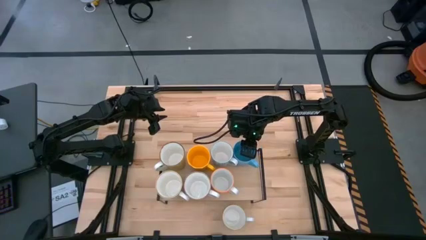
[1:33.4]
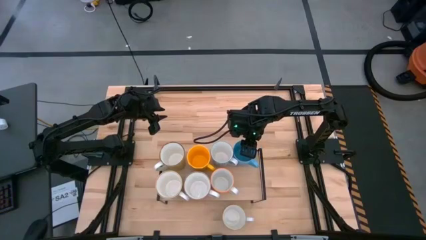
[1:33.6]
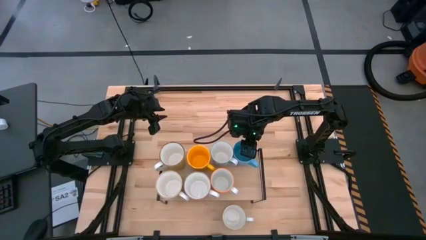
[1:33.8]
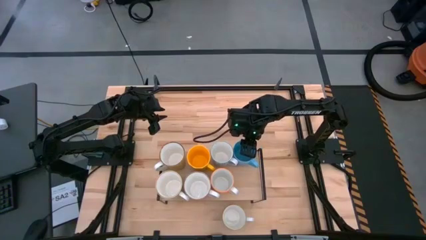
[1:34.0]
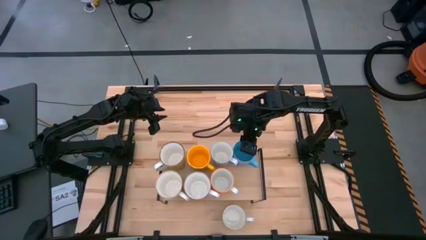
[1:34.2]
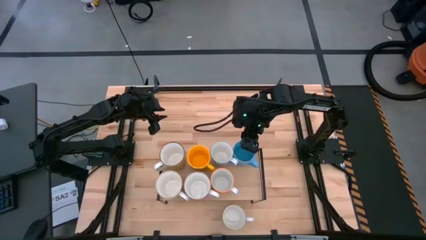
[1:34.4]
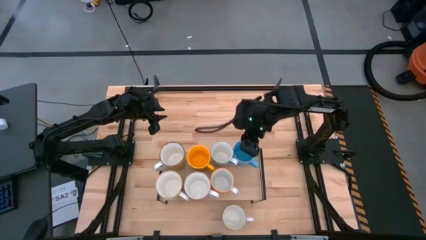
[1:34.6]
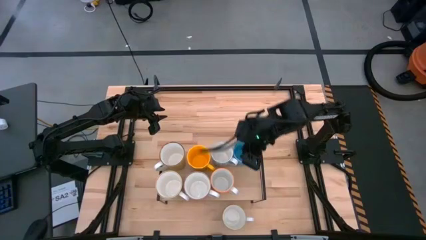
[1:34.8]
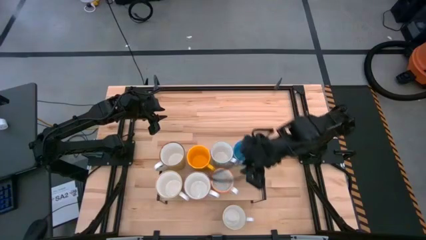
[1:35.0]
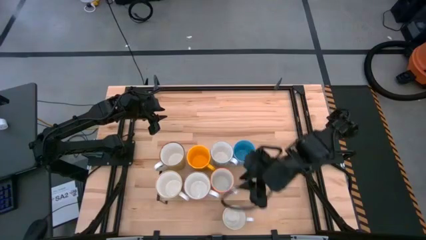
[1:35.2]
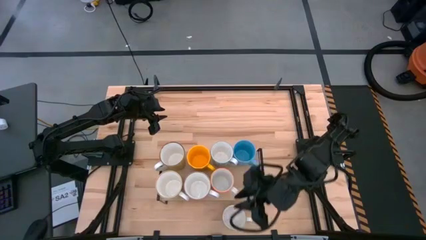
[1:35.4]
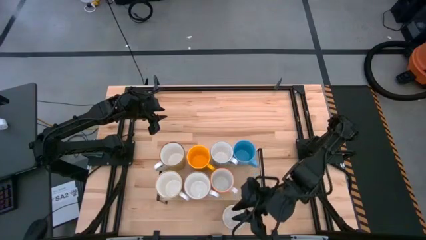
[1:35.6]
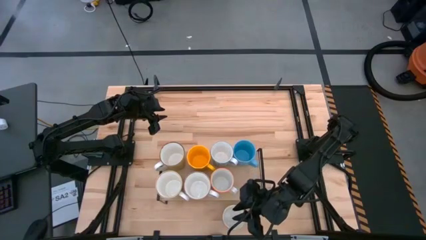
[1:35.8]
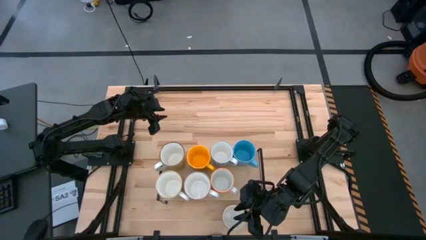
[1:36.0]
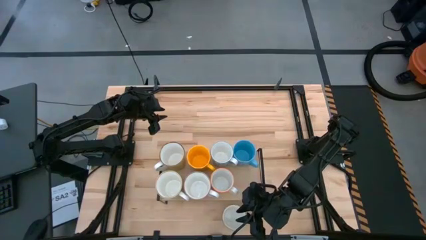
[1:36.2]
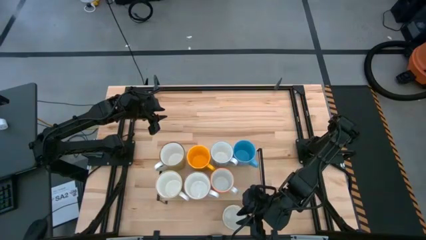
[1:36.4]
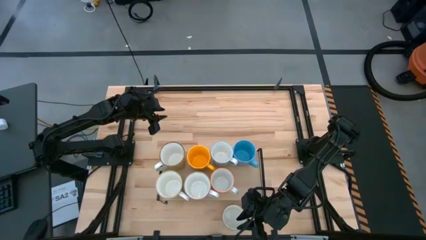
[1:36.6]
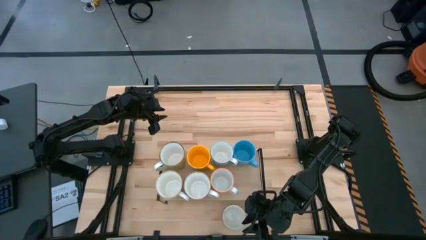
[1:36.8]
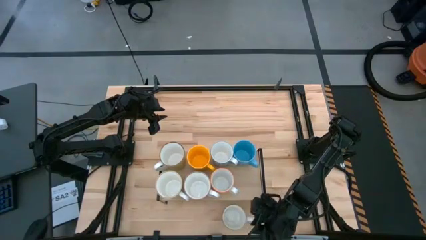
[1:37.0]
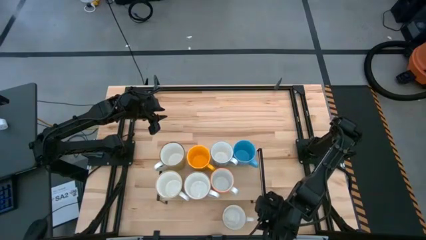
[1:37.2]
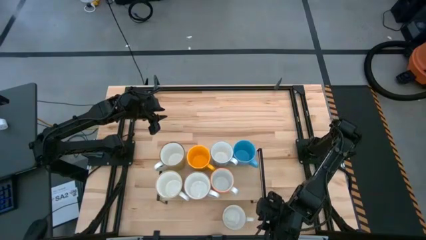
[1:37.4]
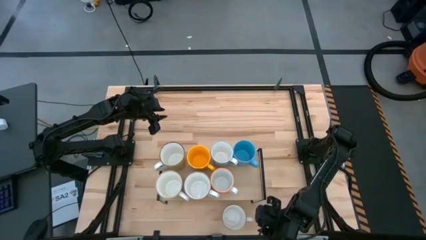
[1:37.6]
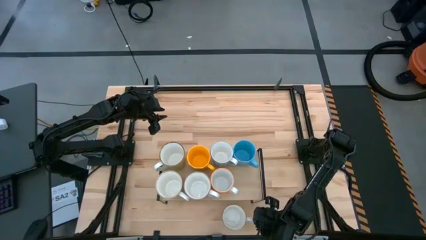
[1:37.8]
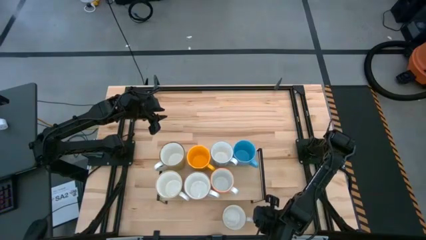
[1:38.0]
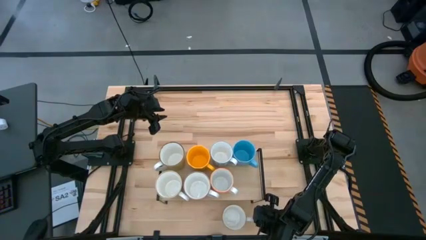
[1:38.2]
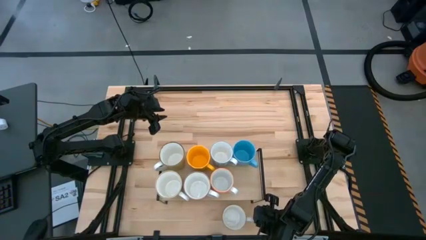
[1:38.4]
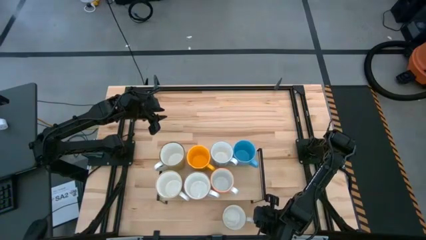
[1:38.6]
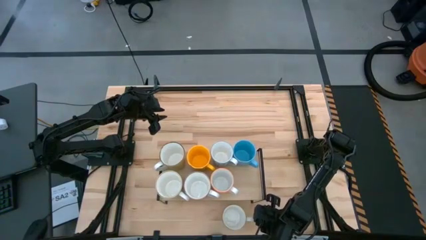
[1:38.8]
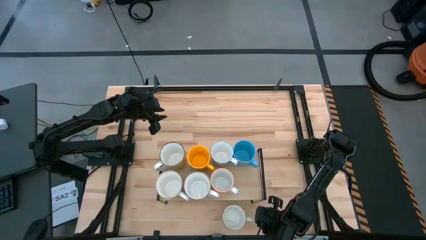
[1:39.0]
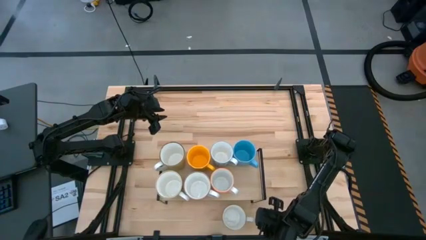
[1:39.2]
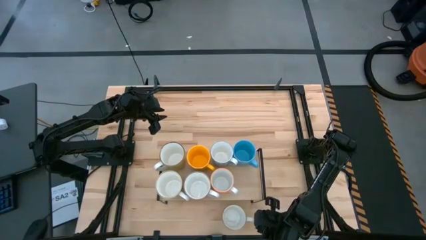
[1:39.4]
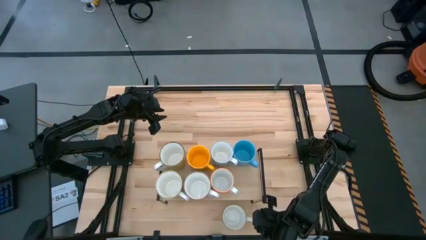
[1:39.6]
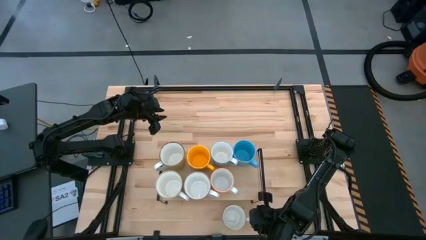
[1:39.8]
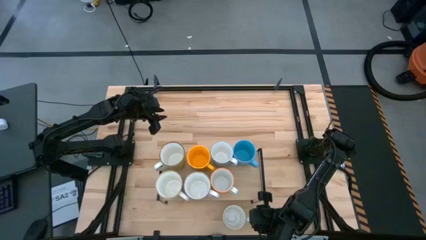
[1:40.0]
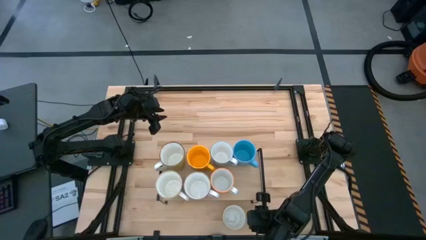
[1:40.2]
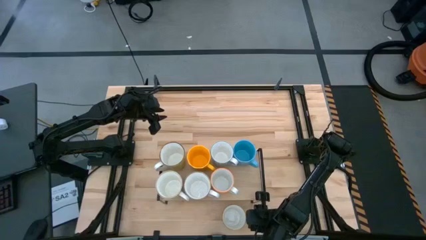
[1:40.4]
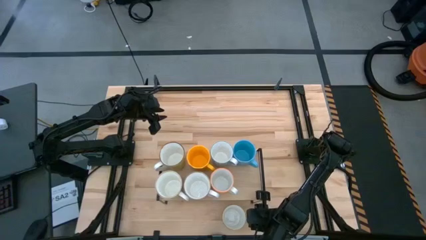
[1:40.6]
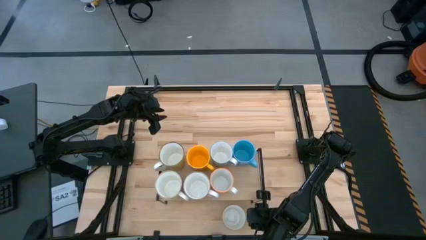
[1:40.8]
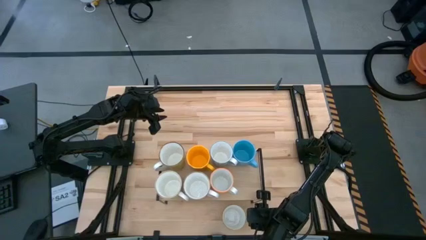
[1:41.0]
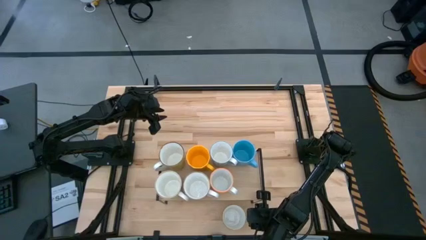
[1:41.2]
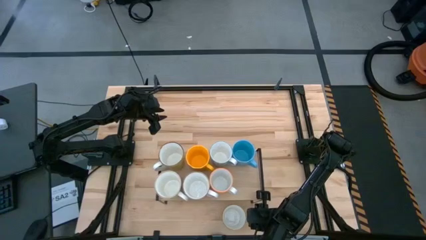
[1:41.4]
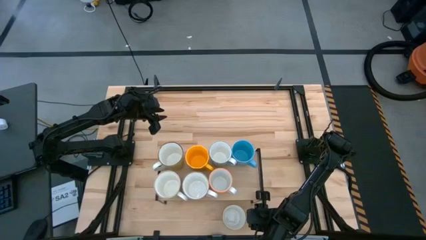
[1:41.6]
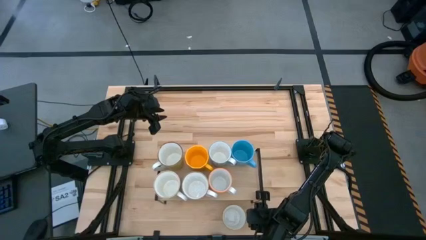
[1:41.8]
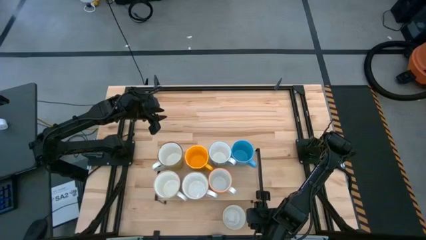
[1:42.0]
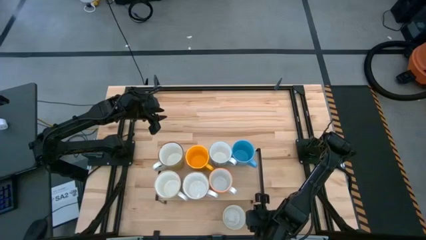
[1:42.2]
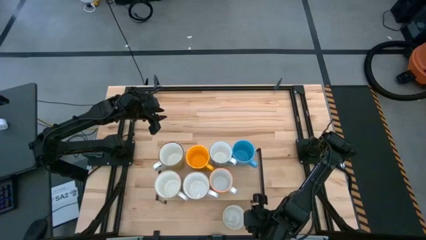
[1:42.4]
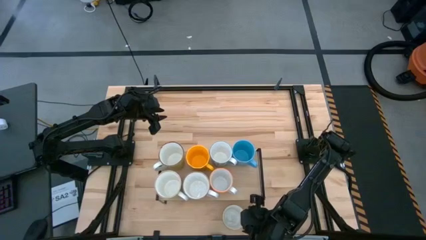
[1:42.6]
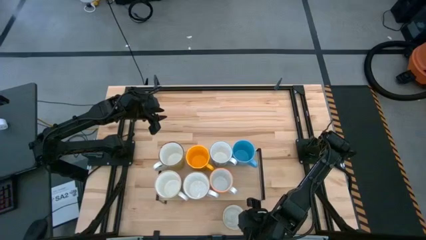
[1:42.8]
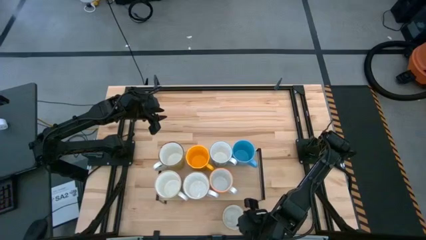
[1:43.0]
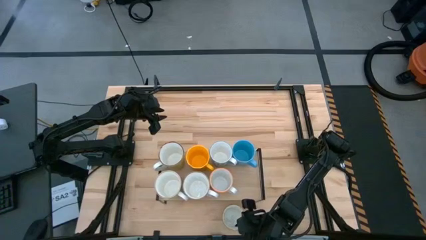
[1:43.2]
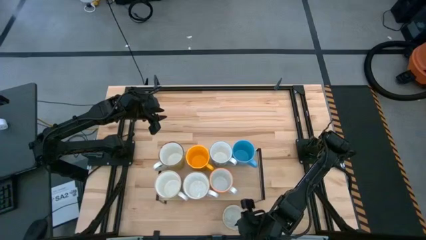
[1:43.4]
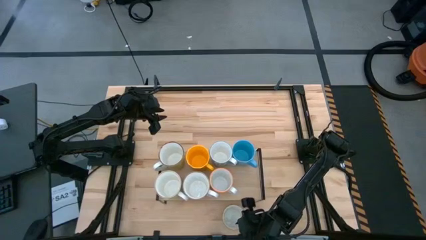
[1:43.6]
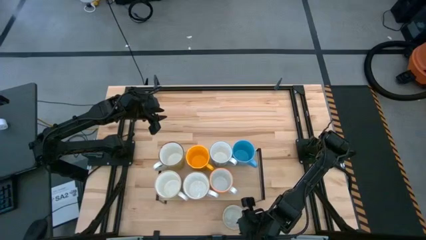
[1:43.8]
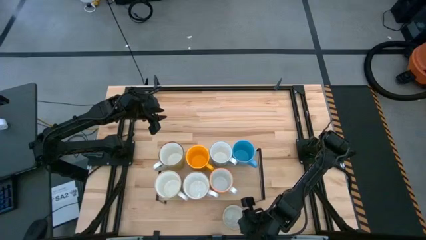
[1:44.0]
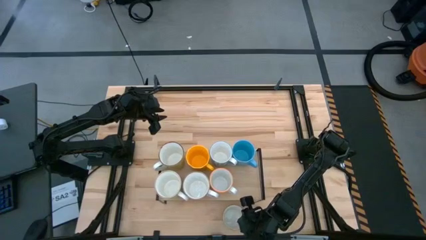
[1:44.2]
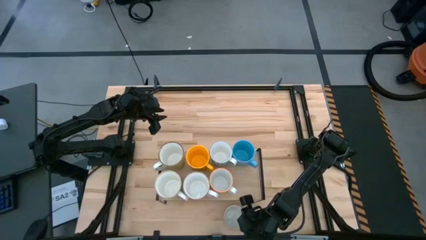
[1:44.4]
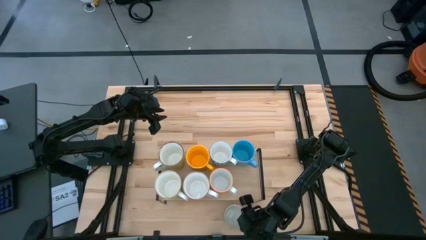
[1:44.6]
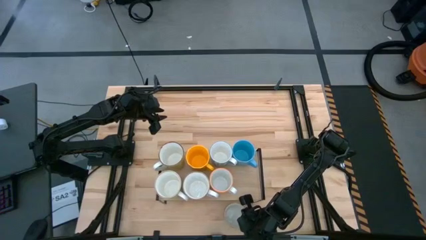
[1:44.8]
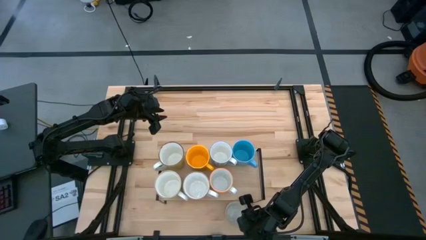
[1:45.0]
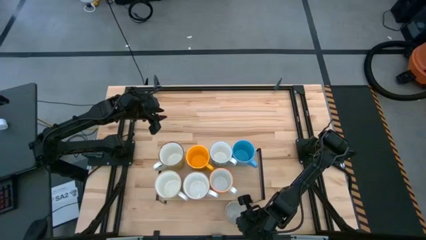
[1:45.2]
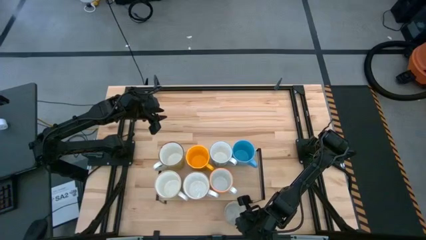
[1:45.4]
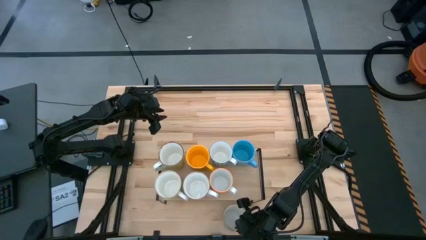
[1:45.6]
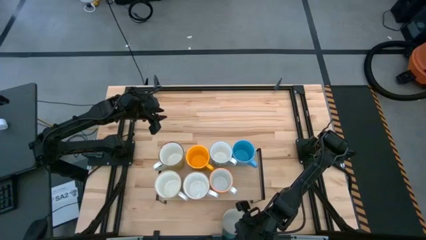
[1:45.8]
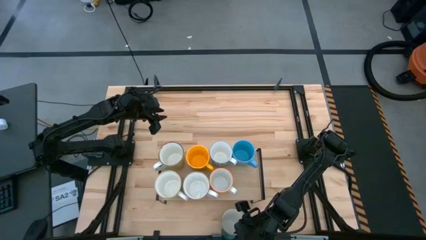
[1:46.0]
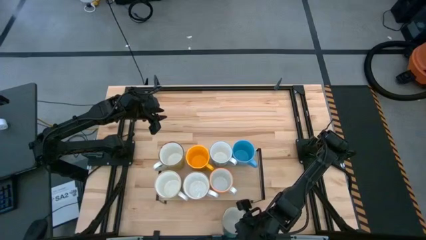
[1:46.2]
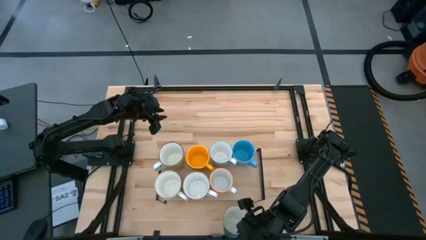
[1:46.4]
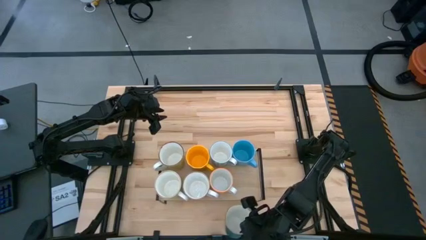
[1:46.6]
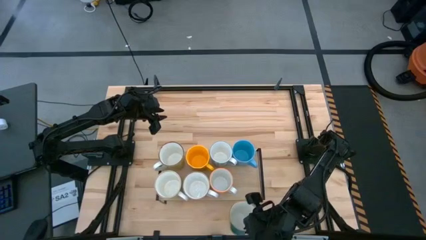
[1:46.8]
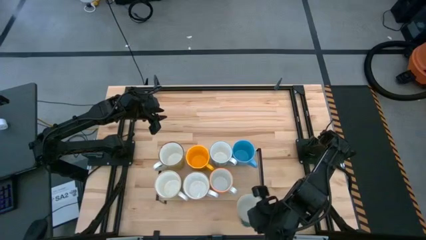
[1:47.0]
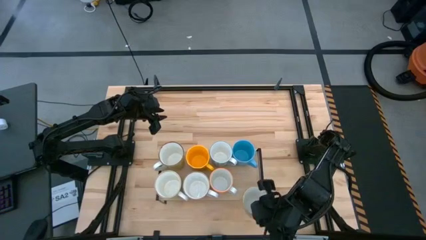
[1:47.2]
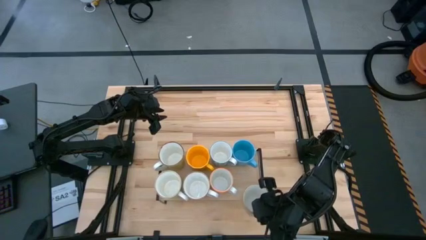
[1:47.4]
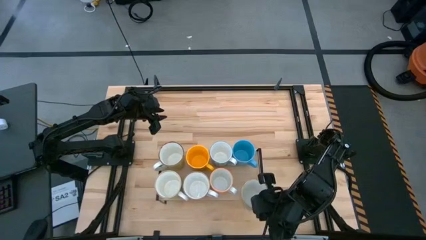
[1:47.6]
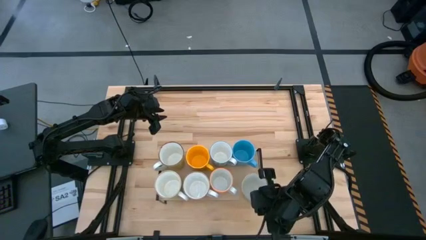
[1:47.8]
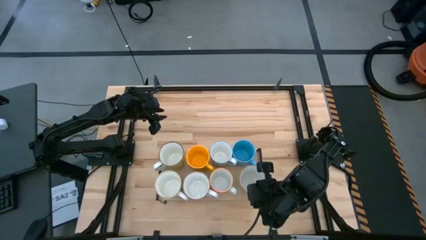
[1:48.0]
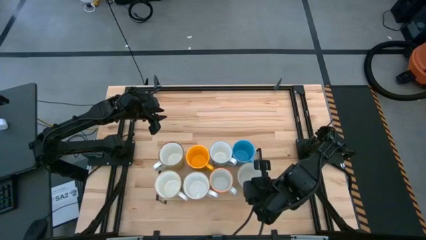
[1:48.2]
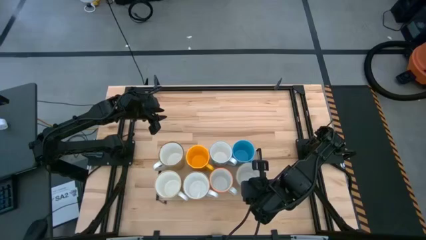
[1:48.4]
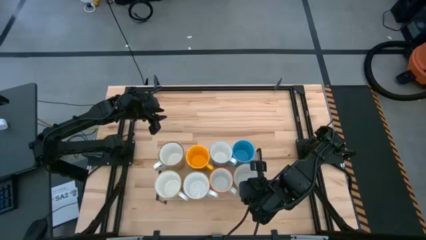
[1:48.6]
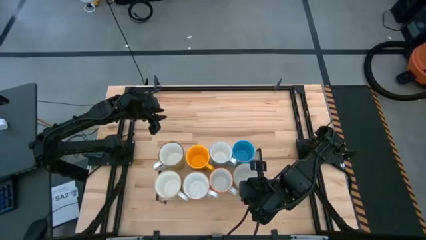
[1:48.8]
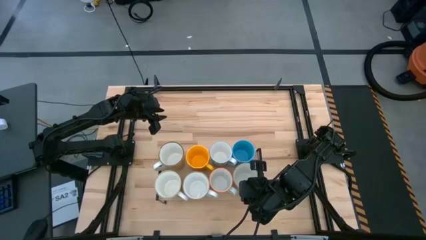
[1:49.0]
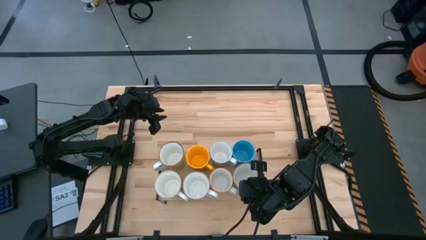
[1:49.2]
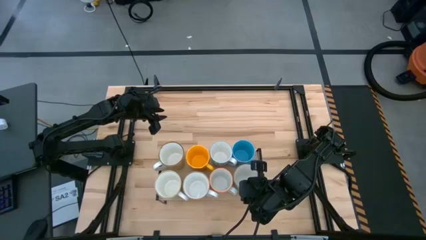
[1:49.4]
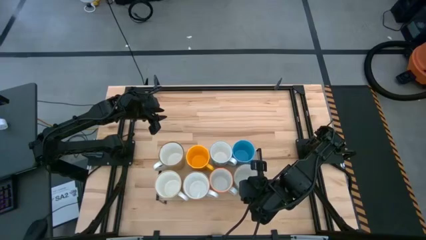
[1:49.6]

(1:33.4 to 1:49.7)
Task: Place coffee mugs
Put the light blue mug on the shelf

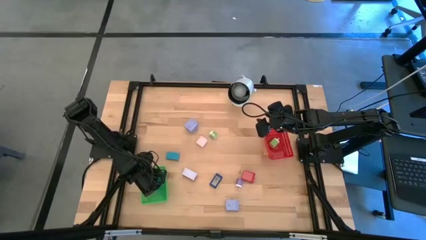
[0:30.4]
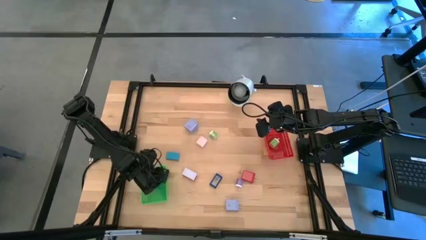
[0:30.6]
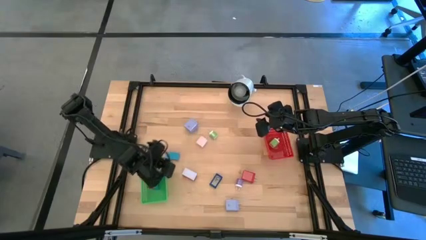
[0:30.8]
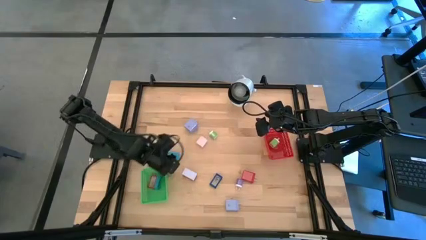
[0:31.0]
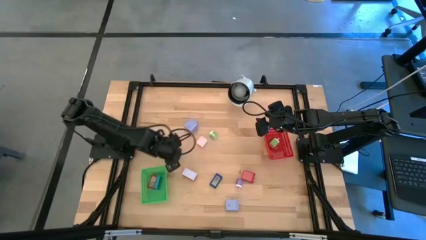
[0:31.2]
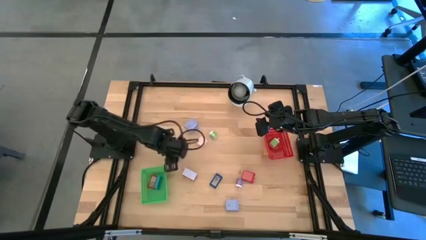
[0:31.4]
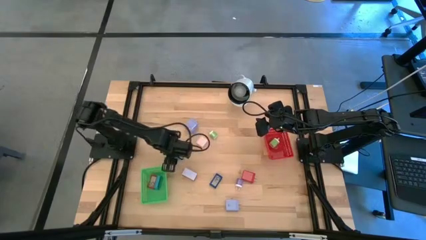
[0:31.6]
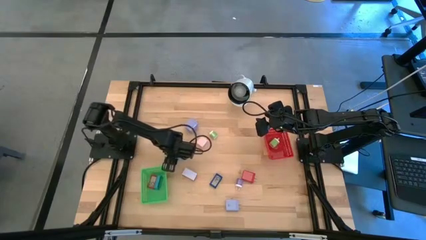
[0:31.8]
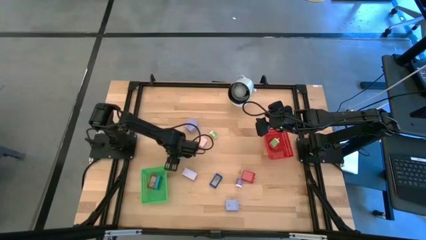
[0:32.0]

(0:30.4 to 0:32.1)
Task: Pick & Place Office items
Put the light blue digital clock into the green bin
